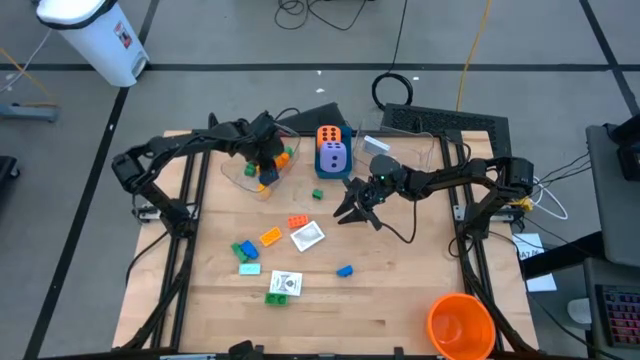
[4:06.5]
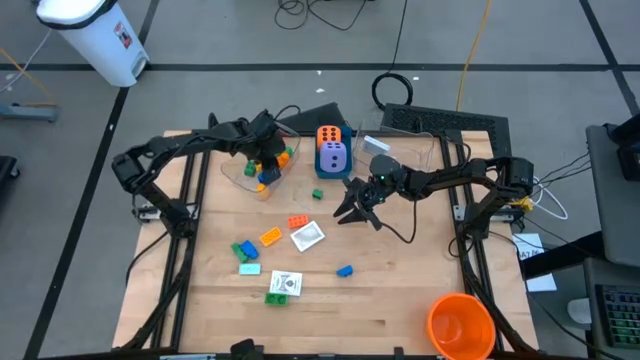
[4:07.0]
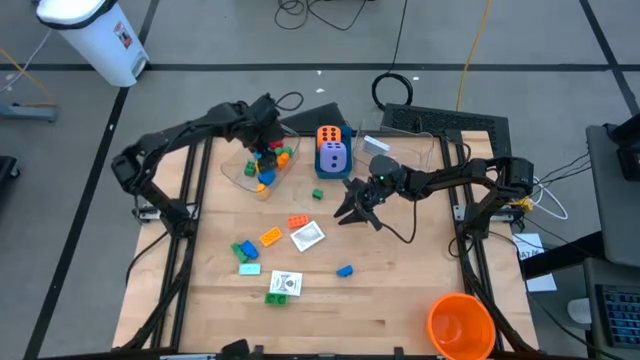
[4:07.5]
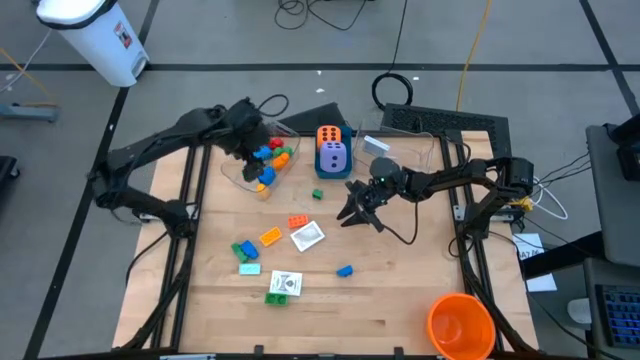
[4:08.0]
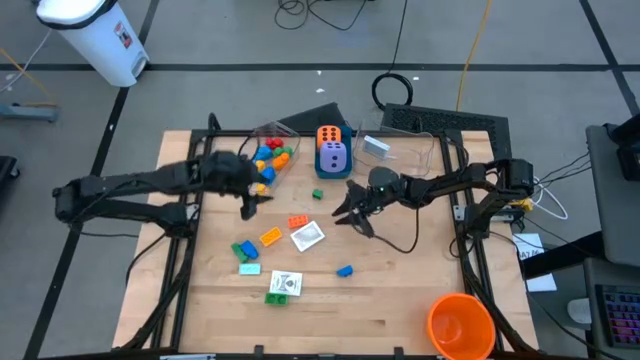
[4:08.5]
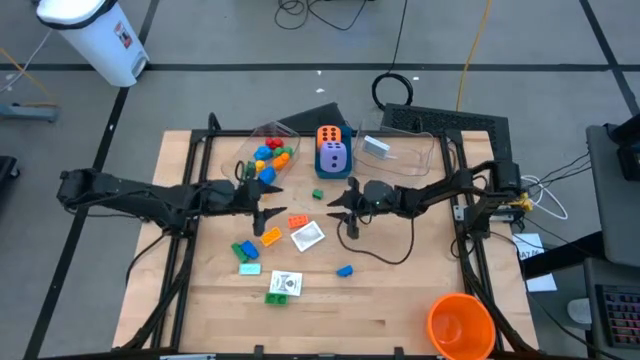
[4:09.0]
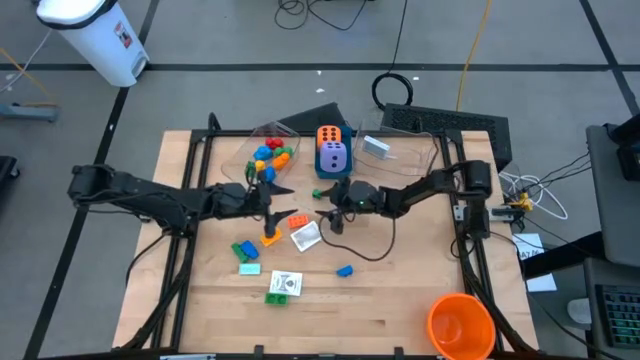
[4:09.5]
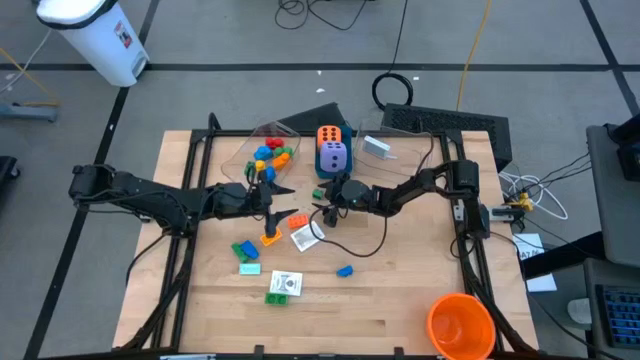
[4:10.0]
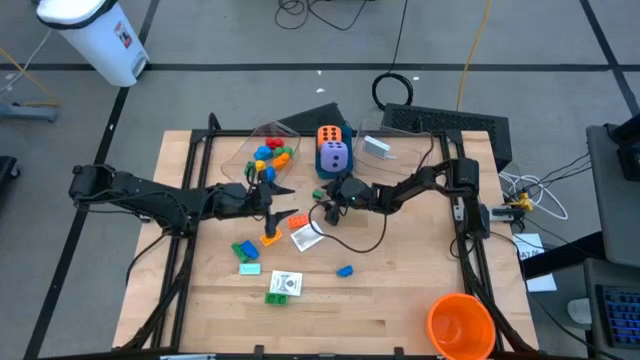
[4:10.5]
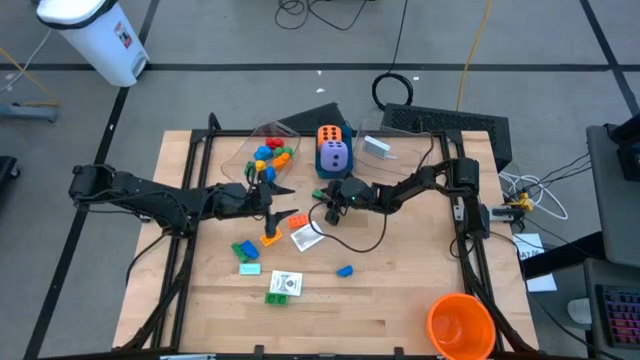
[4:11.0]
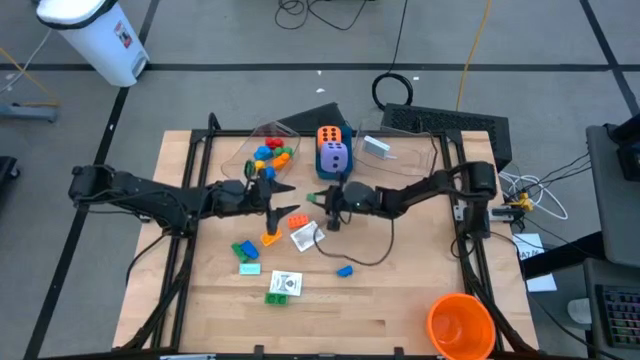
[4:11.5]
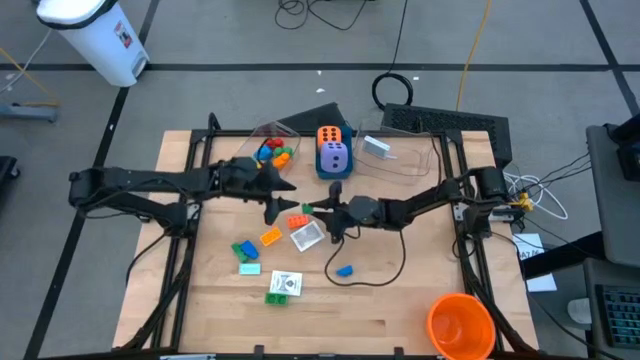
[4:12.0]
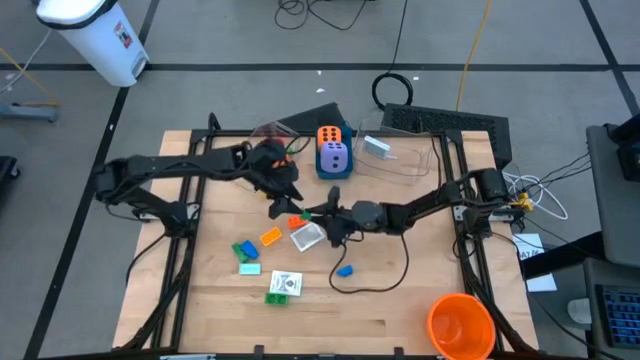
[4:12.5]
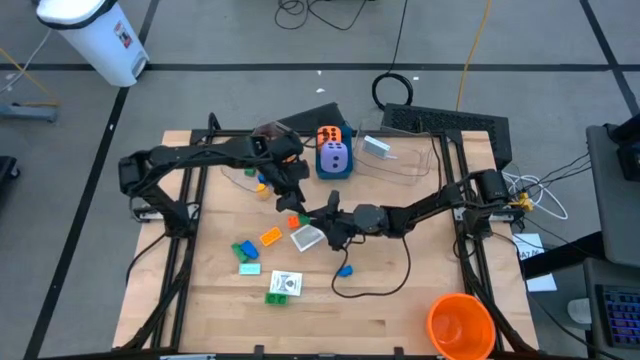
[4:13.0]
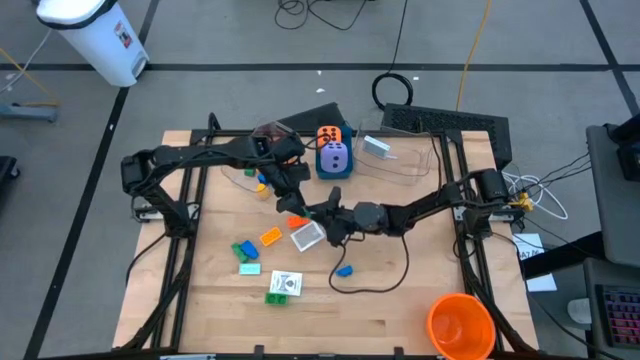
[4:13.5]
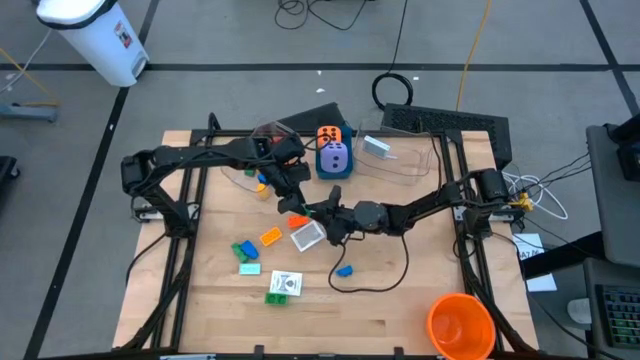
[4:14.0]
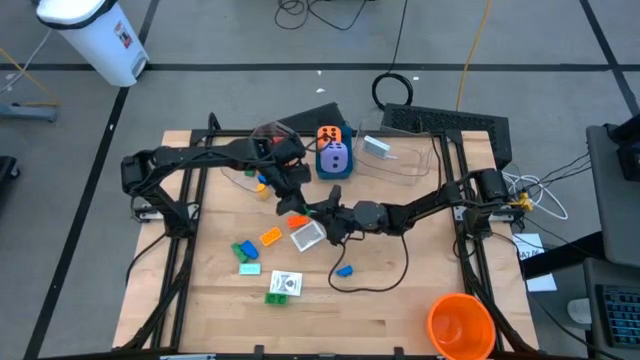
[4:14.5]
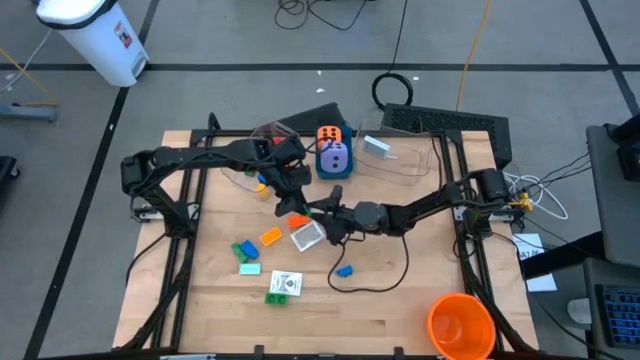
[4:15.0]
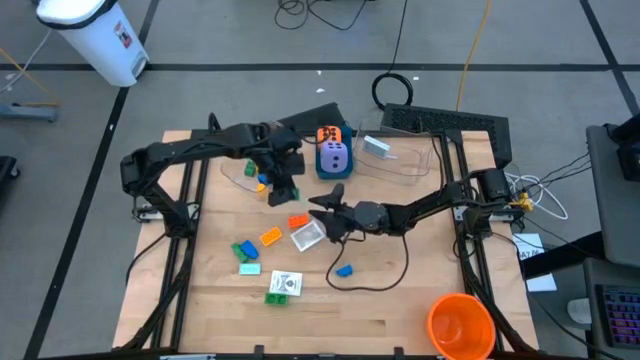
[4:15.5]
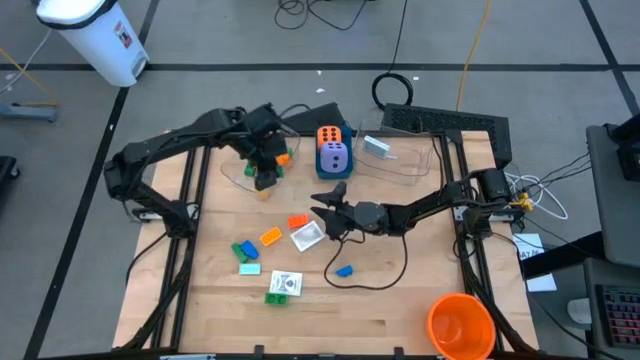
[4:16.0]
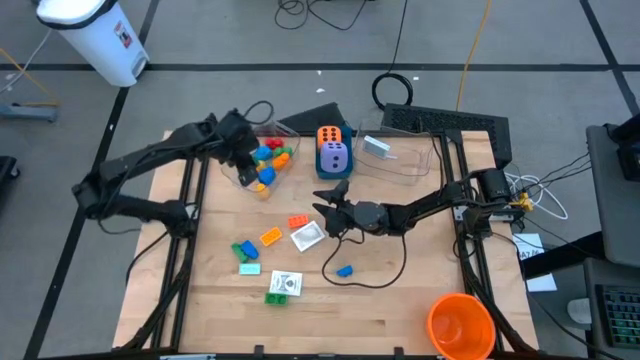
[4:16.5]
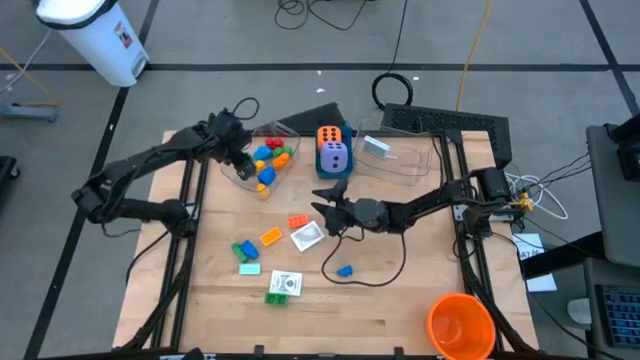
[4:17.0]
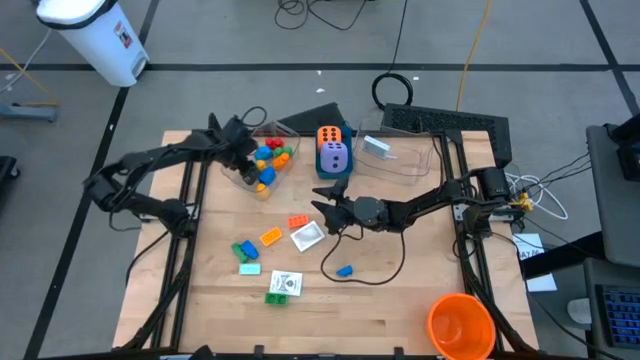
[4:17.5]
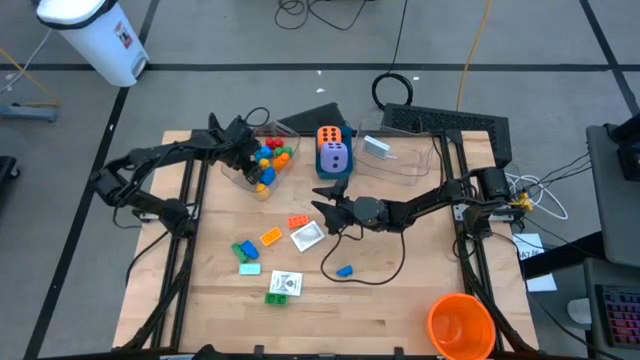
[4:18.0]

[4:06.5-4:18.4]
Task: Pick & Place Toys
Put the green game piece into the left transparent bin

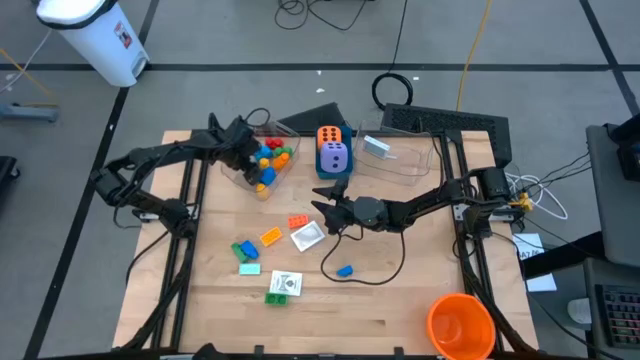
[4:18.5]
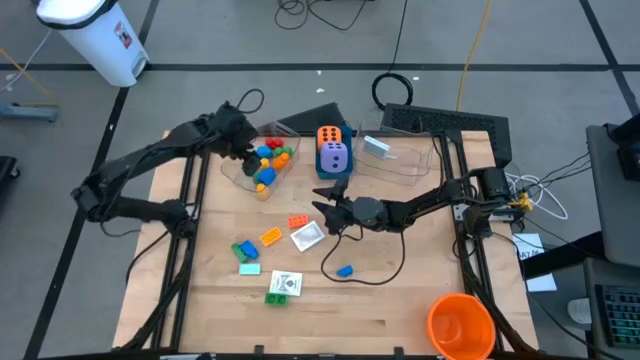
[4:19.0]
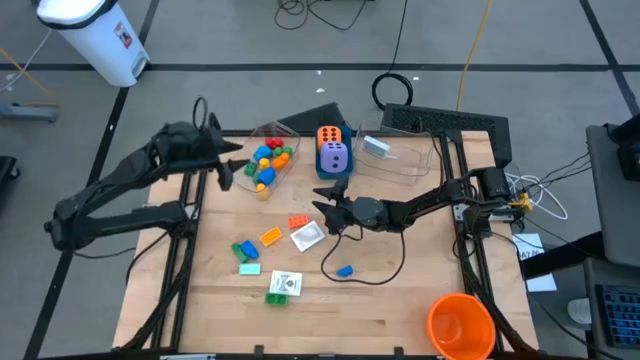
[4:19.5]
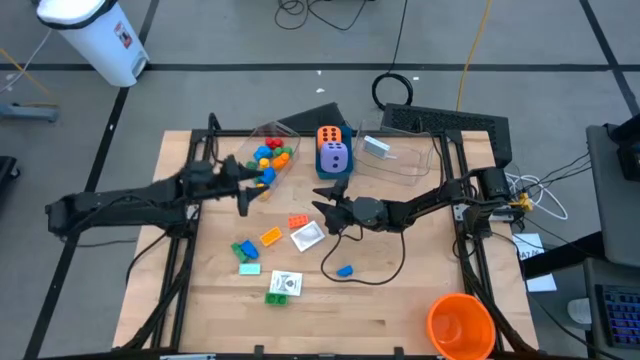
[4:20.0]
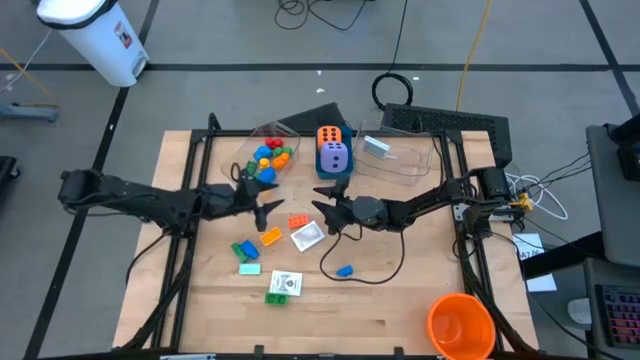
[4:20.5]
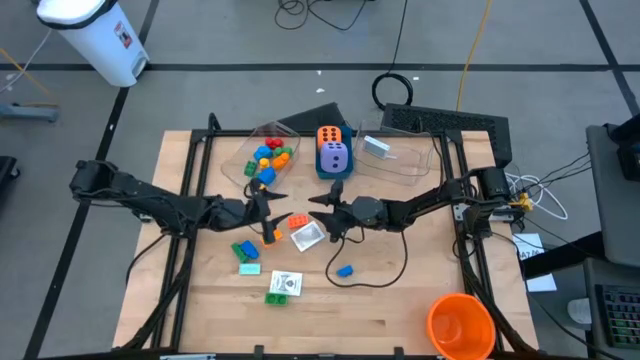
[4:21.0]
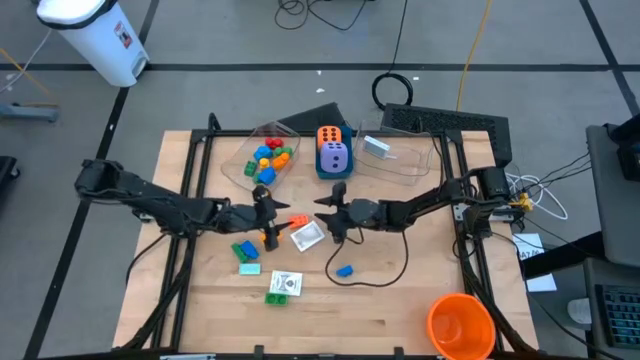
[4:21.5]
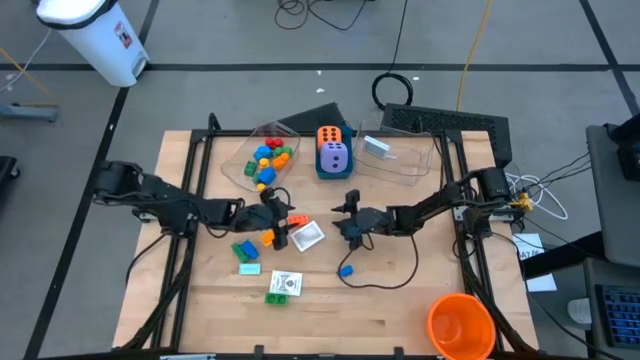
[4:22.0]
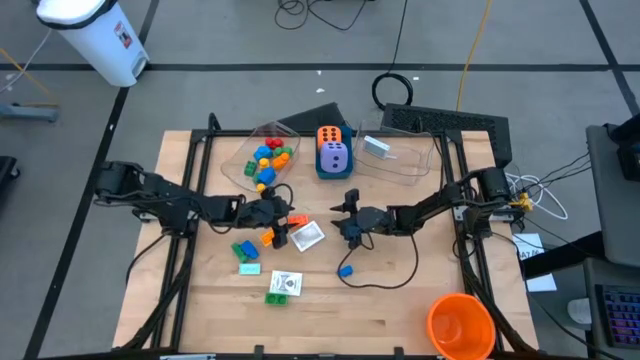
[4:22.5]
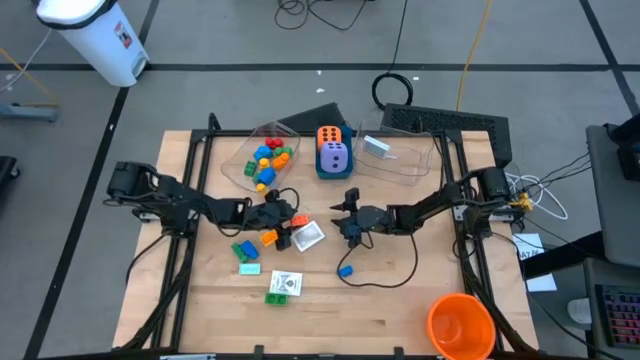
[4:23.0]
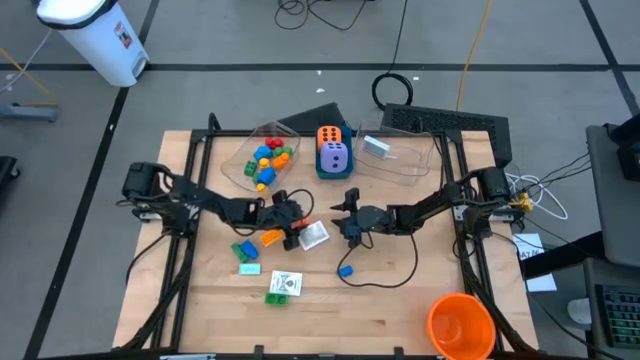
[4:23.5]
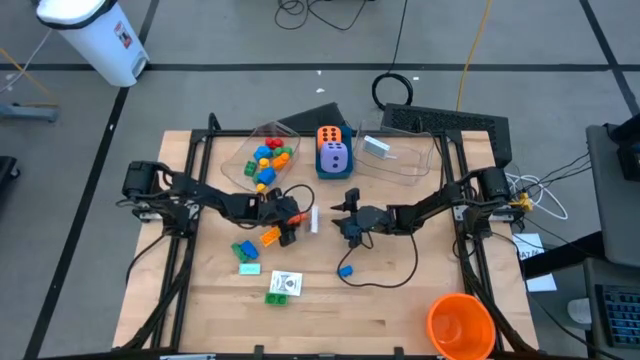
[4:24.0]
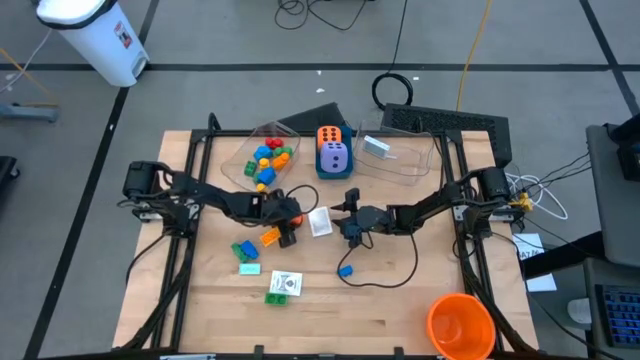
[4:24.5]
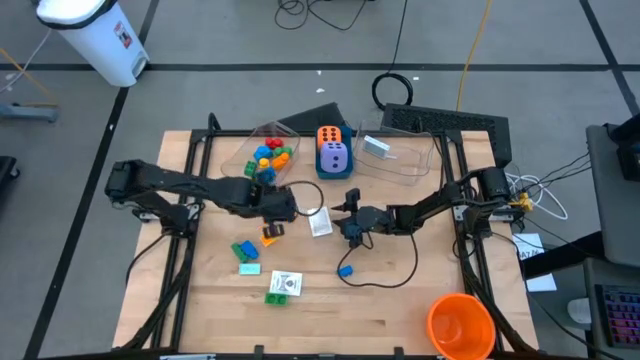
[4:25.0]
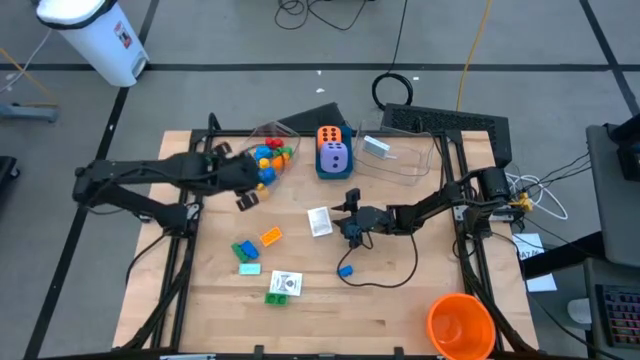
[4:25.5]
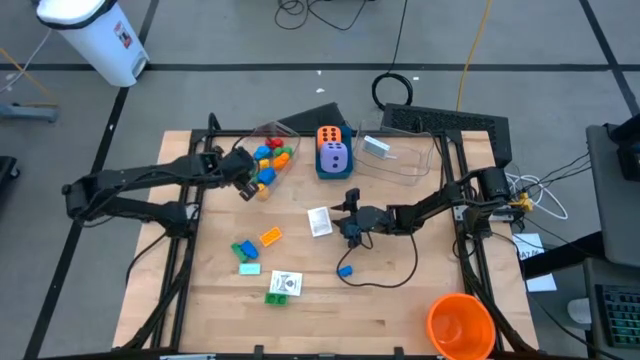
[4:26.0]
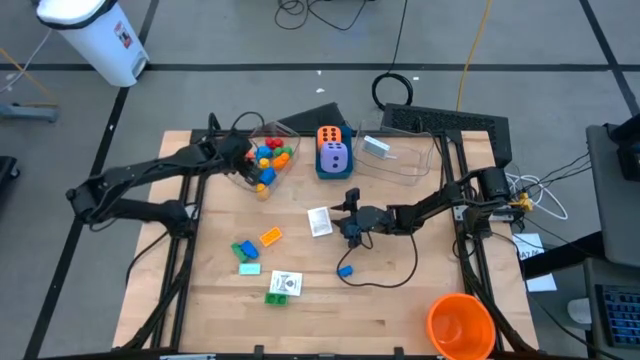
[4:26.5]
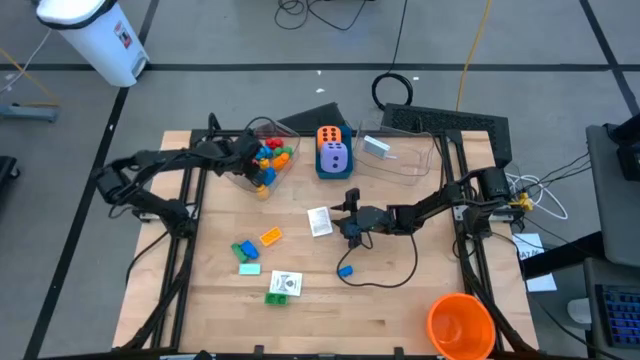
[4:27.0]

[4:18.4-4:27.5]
Put the orange game piece into the left transparent bin

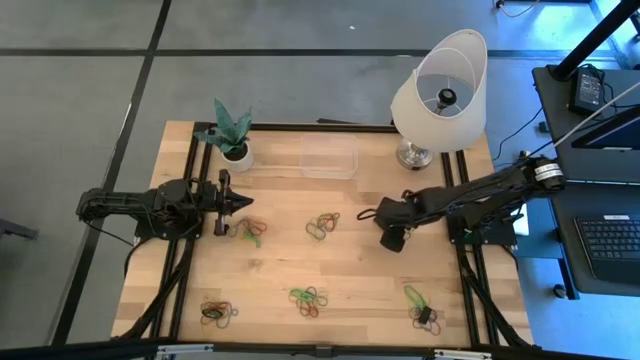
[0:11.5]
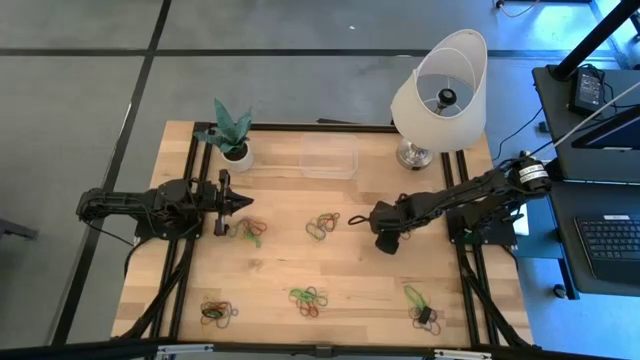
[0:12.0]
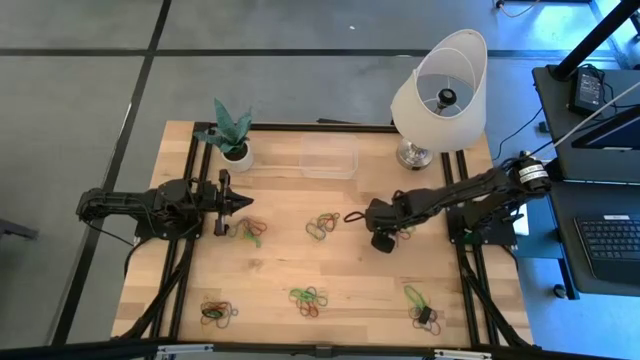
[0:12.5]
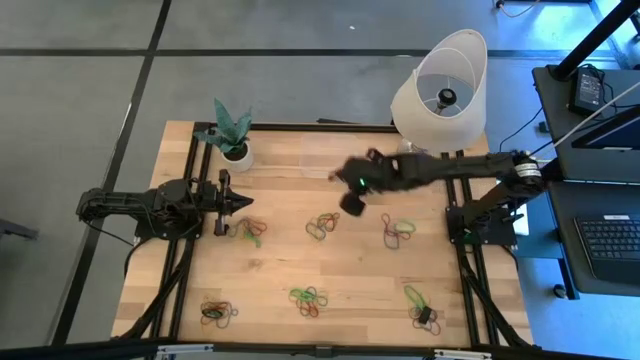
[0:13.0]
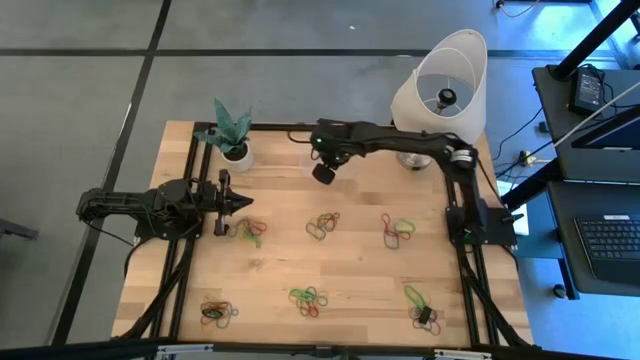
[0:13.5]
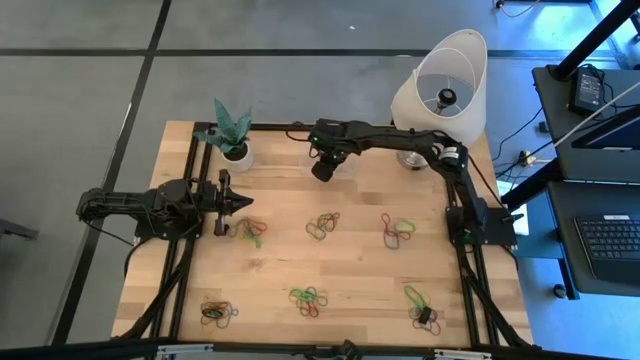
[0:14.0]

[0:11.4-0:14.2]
Task: Pick and place rubber bands into bin
Put the black rubber band into the transparent bin
